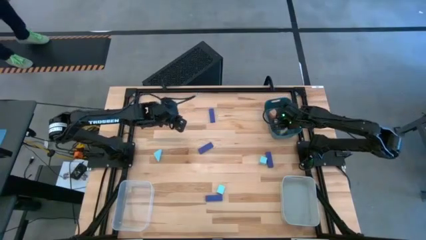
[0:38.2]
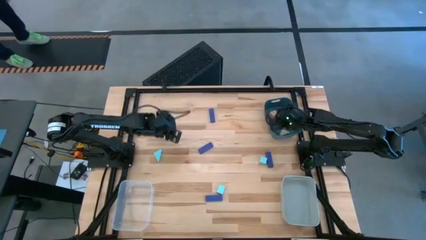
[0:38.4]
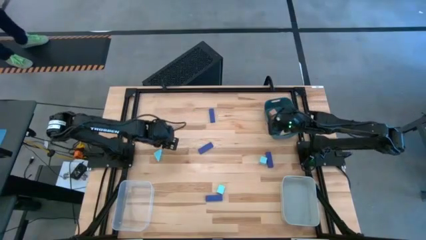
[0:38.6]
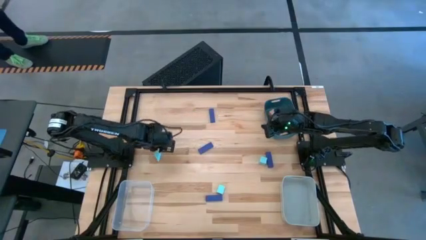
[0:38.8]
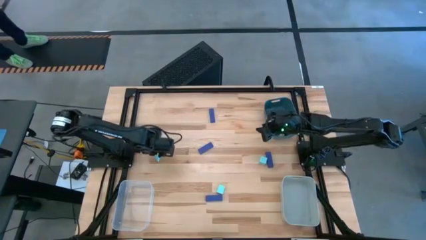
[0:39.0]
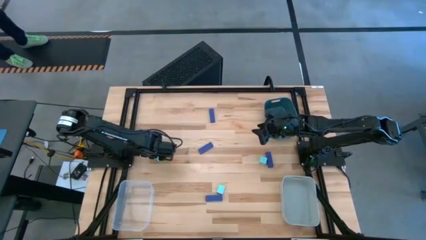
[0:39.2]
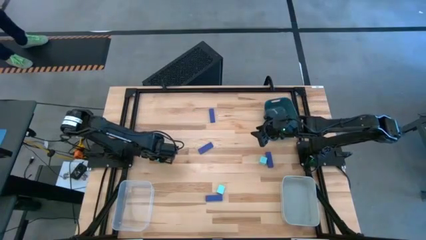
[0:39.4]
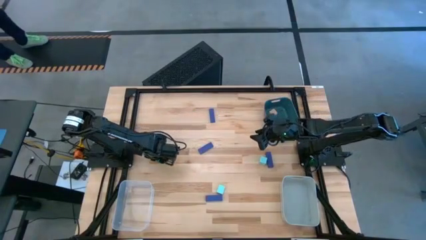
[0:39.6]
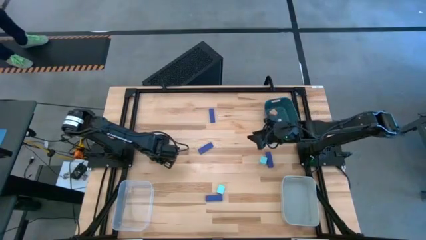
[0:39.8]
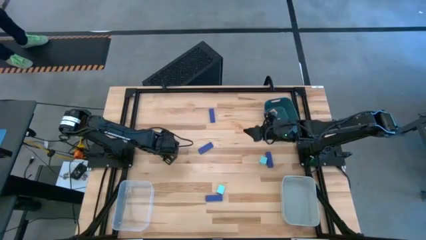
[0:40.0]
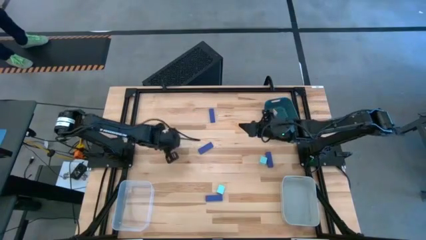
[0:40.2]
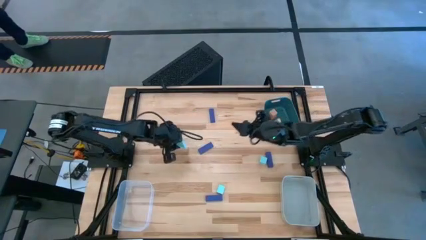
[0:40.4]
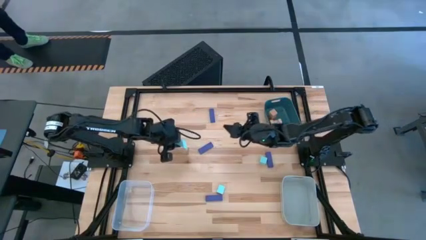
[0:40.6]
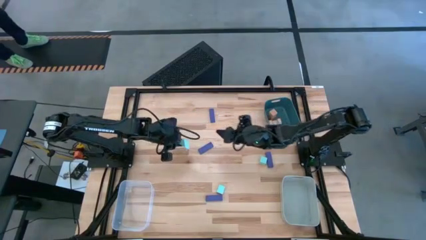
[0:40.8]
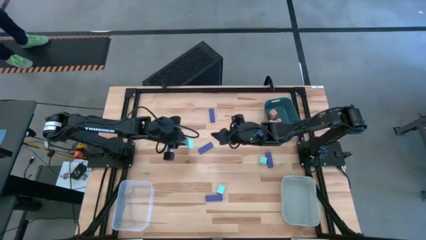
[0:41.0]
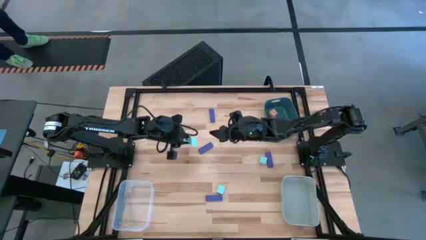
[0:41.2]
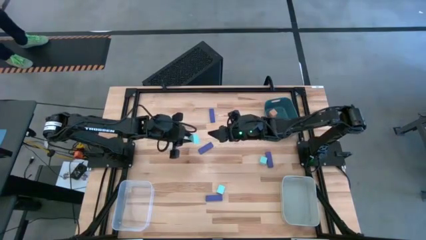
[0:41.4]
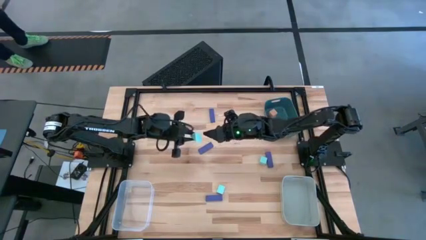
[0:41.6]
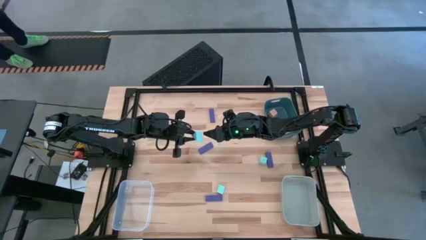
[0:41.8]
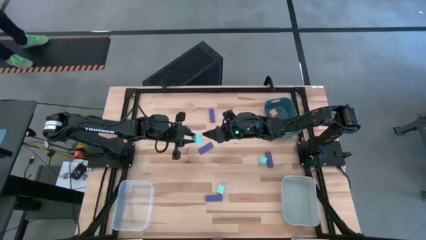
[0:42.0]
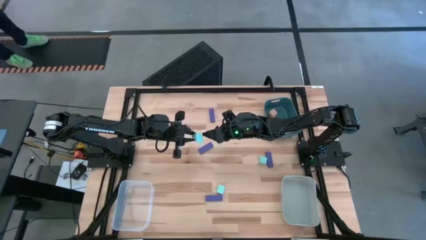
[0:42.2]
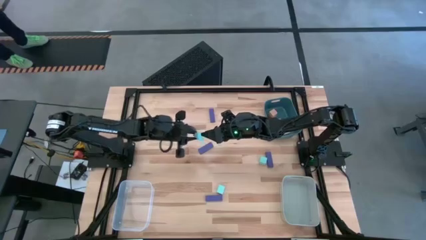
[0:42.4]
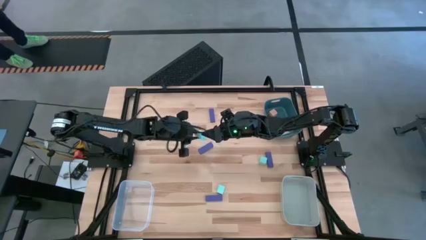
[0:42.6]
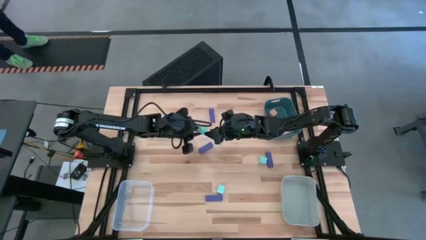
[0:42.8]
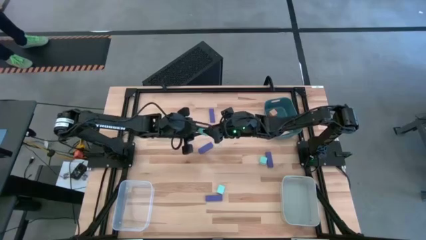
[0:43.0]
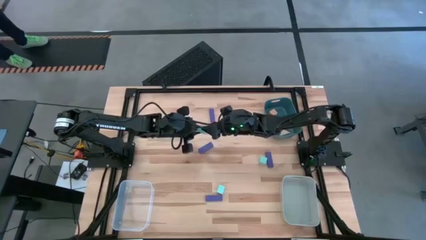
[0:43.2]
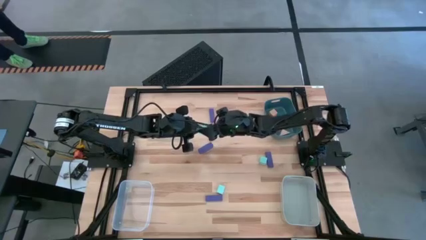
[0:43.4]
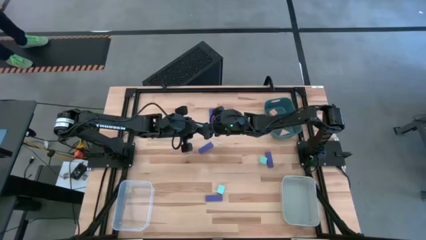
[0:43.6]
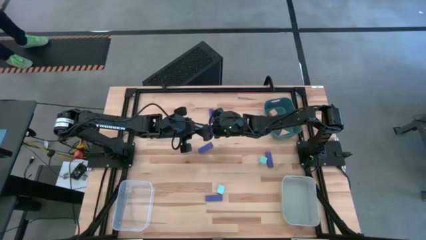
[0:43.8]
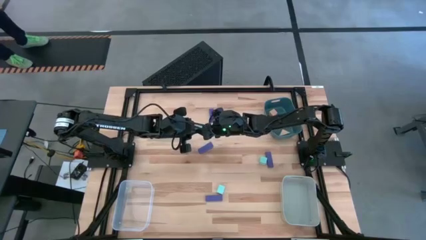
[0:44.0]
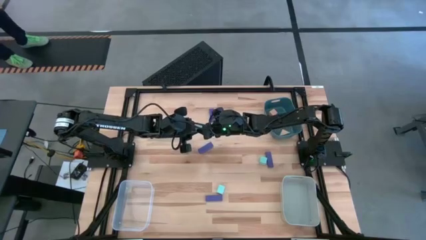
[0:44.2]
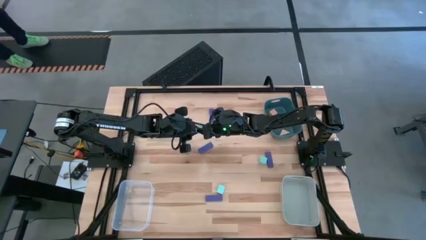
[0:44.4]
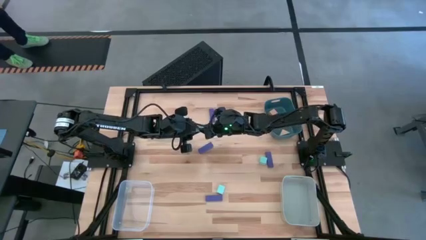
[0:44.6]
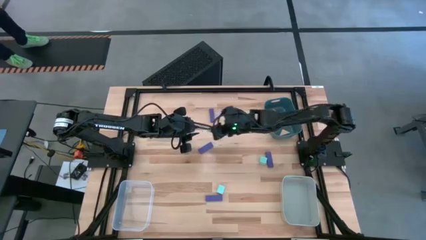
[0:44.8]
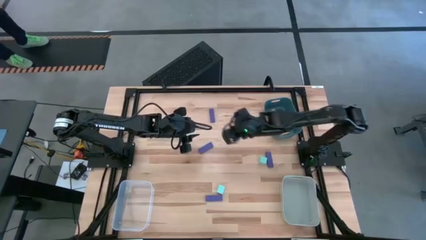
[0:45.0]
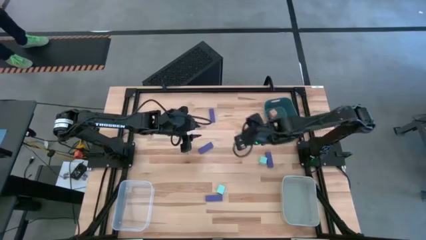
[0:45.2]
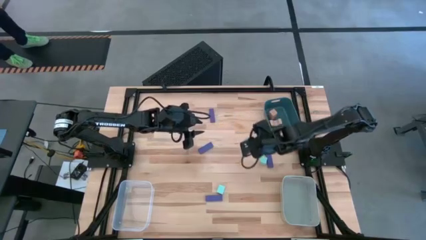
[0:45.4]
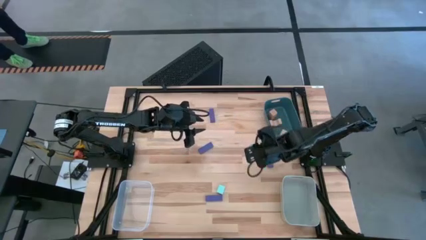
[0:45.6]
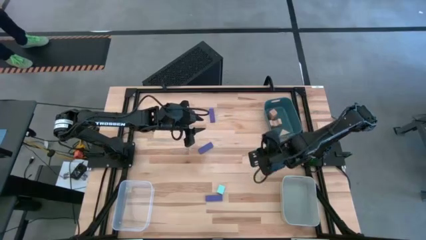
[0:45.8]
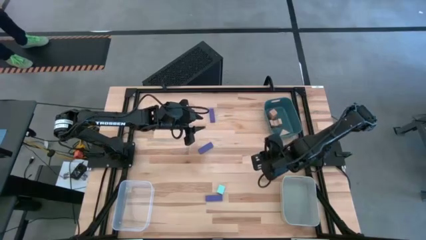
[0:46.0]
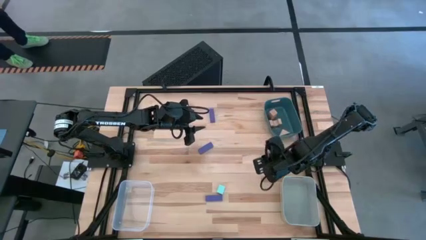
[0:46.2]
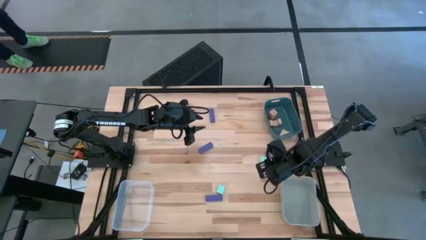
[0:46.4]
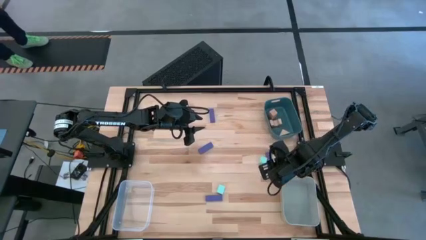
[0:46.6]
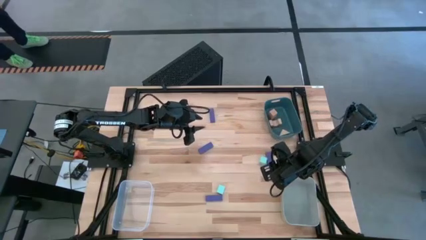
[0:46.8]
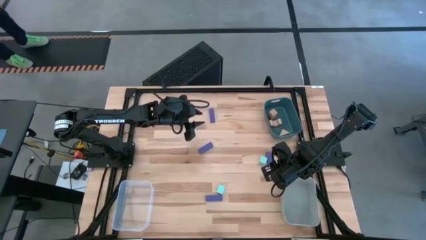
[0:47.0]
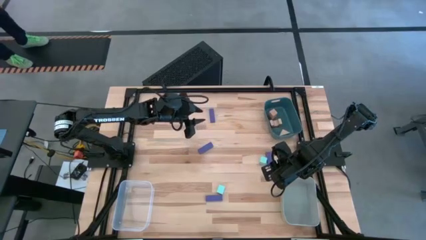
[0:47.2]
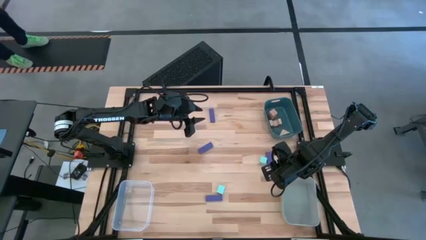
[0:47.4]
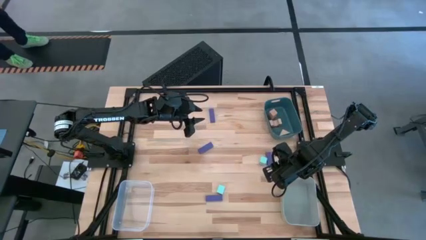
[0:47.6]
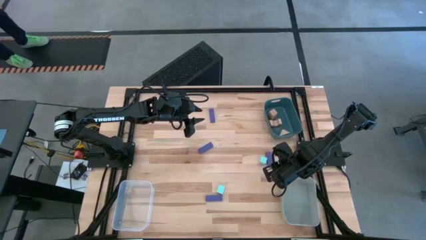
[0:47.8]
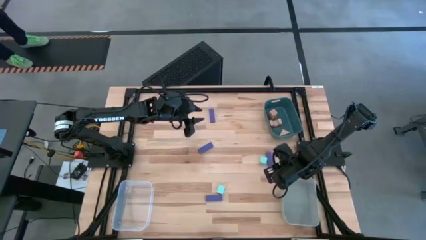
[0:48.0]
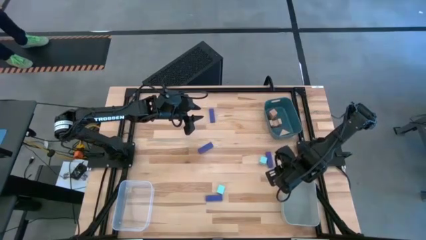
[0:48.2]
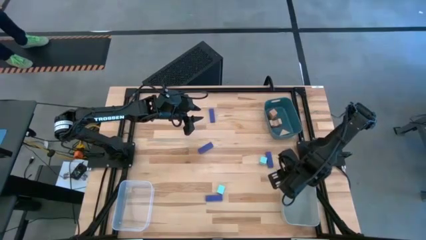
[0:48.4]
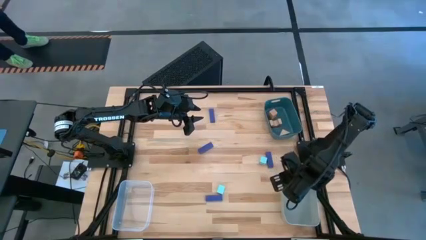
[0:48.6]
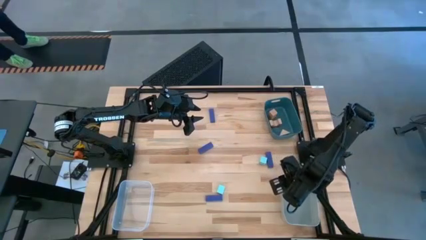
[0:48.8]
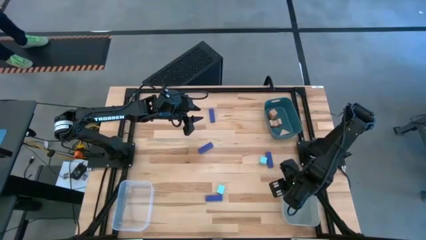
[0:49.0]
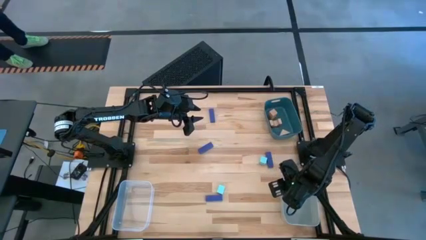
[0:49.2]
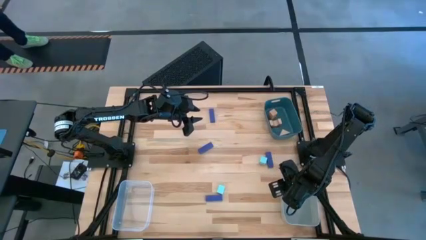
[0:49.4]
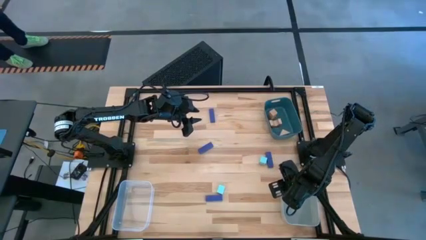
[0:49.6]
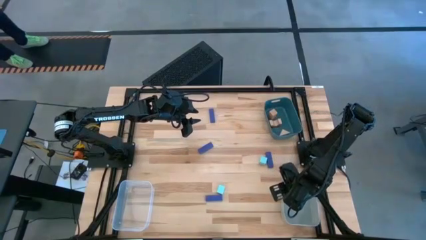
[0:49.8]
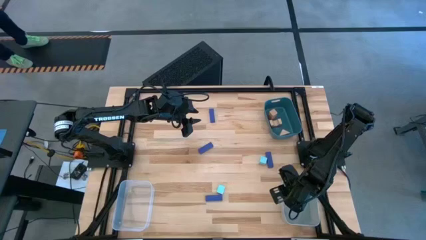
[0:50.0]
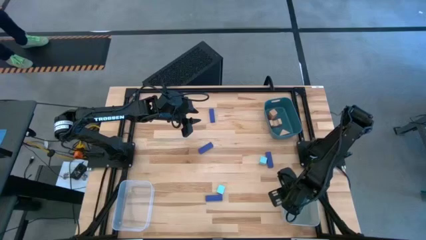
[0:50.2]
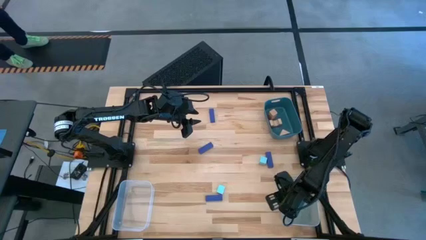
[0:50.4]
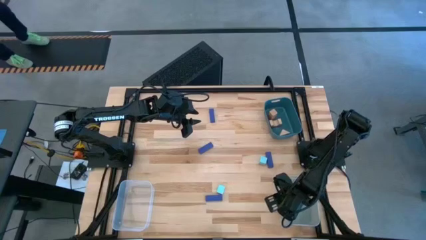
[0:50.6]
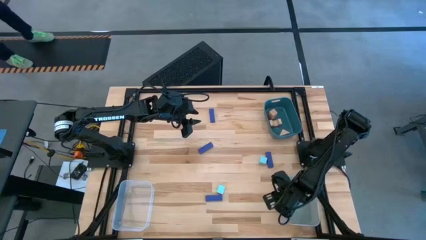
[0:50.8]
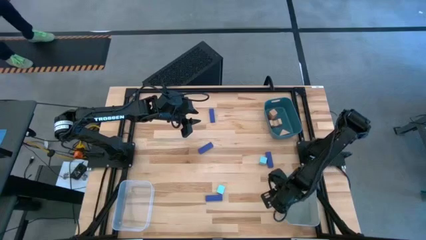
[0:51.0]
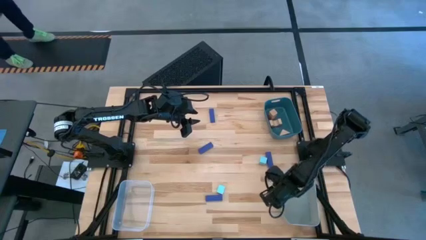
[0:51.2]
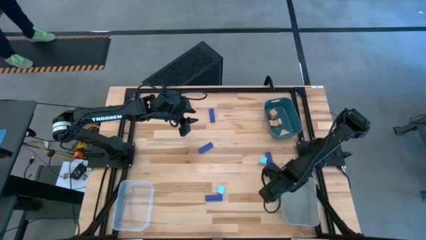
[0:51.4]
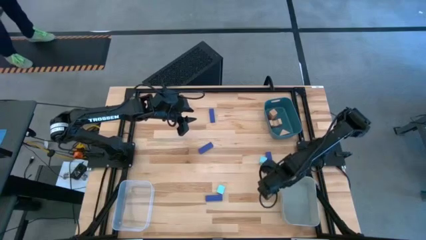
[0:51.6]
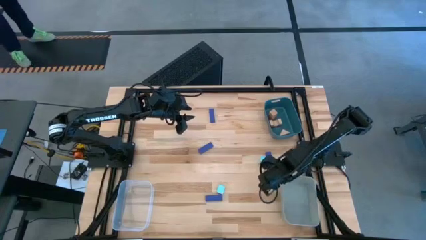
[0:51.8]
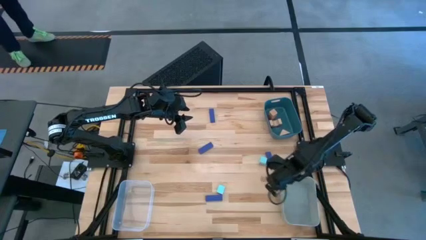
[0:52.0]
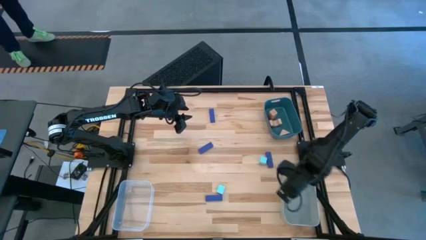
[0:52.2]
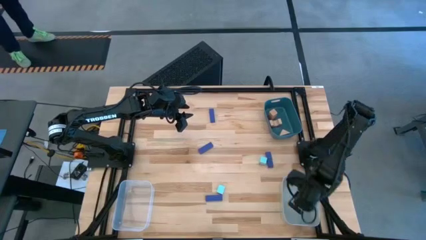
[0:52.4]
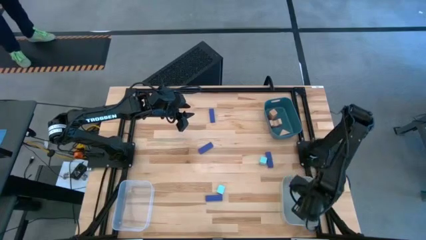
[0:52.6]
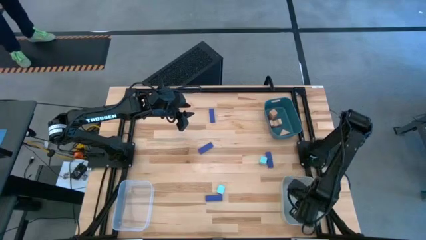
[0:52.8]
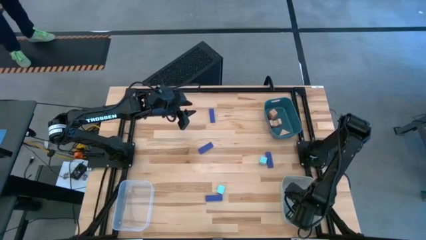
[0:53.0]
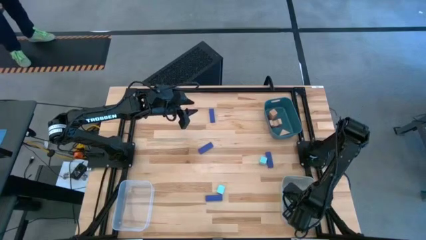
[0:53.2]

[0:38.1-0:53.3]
Task: Sort & place blocks by color
Put the top left light blue block into the grey bin
